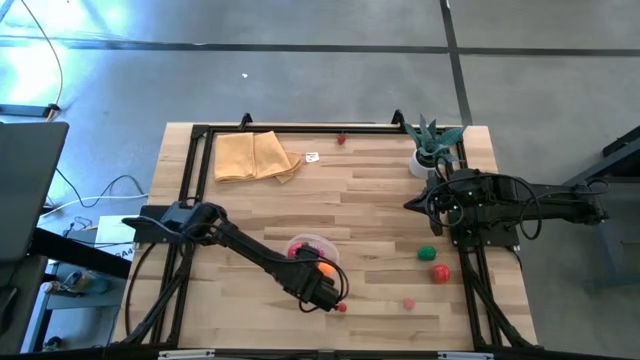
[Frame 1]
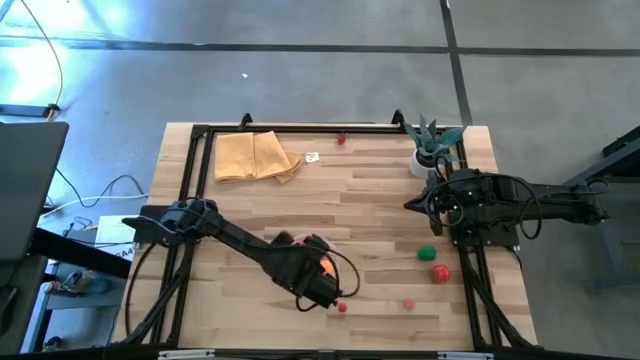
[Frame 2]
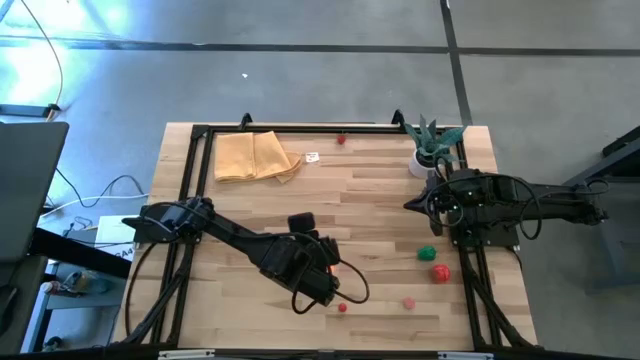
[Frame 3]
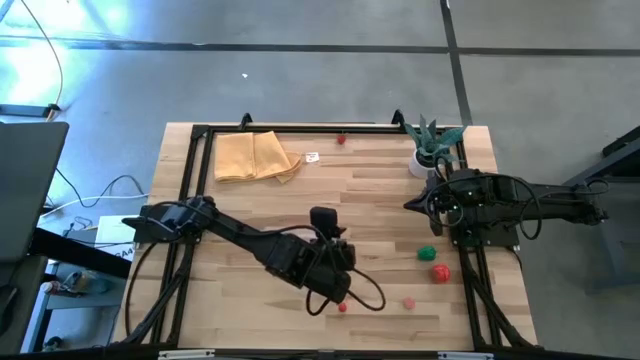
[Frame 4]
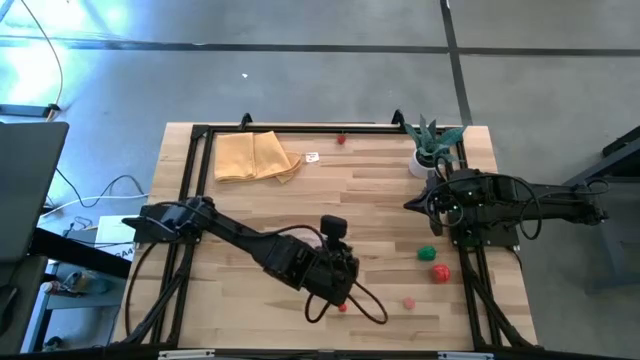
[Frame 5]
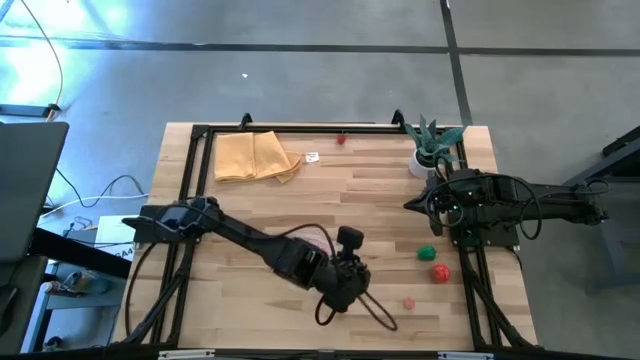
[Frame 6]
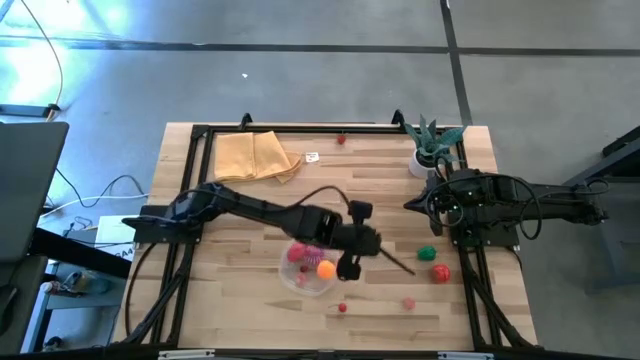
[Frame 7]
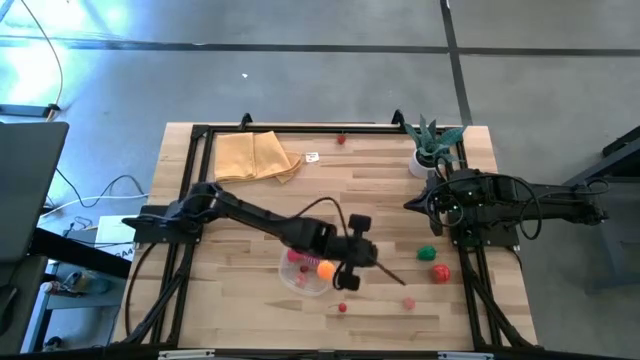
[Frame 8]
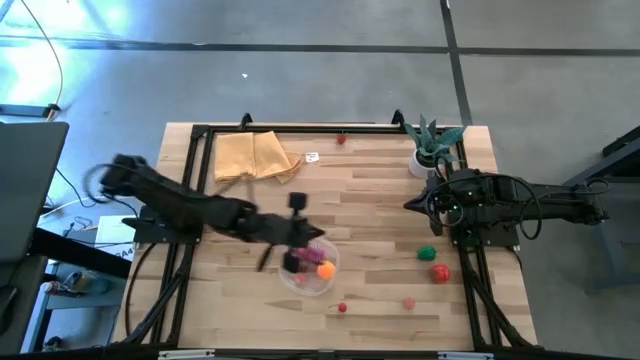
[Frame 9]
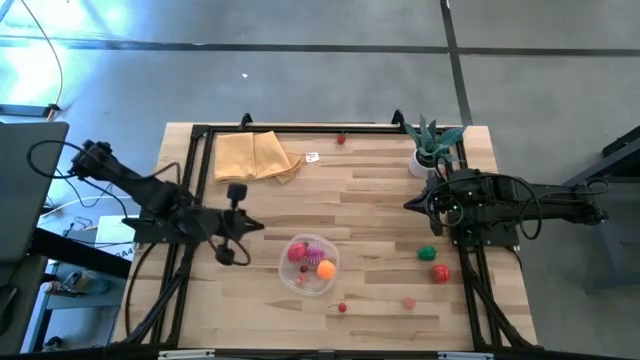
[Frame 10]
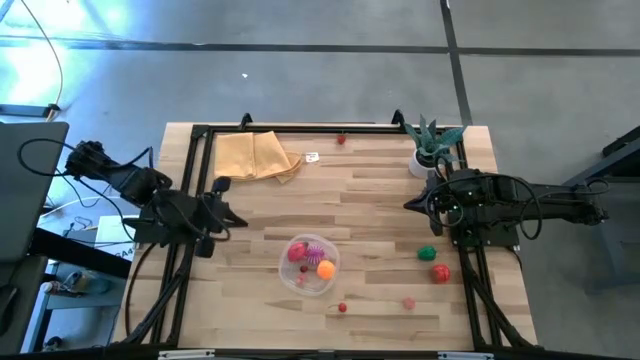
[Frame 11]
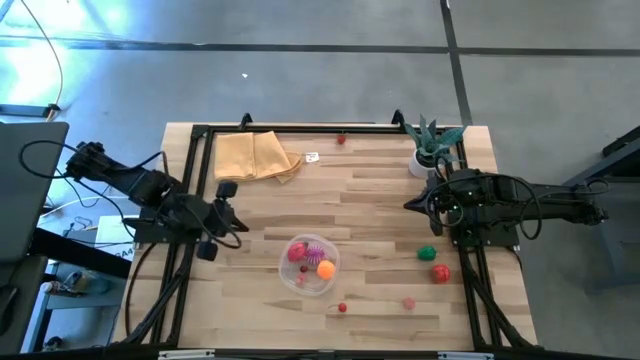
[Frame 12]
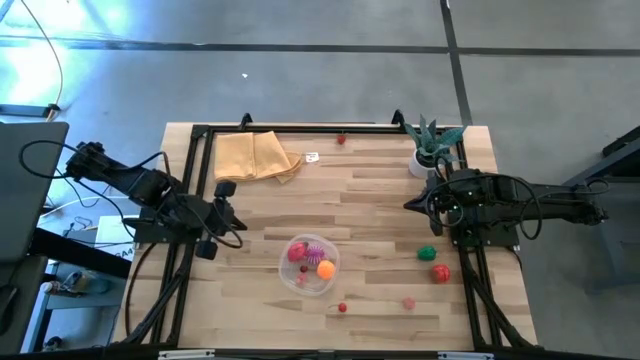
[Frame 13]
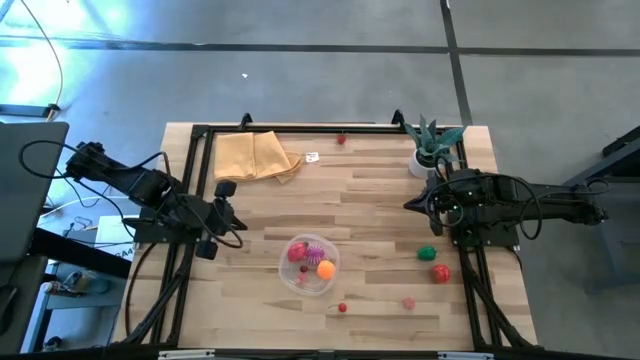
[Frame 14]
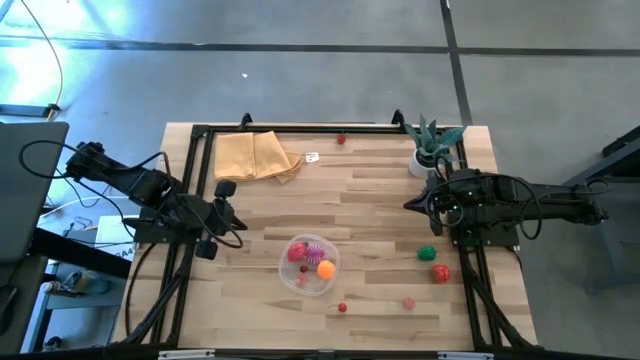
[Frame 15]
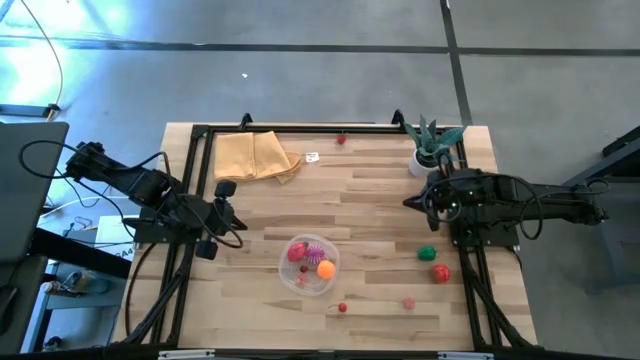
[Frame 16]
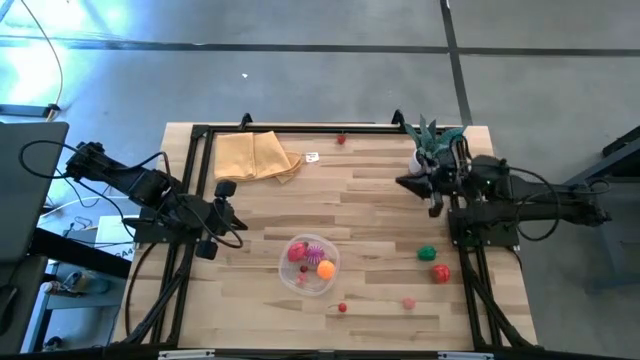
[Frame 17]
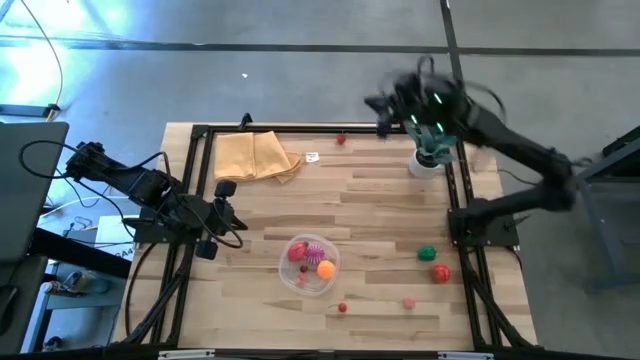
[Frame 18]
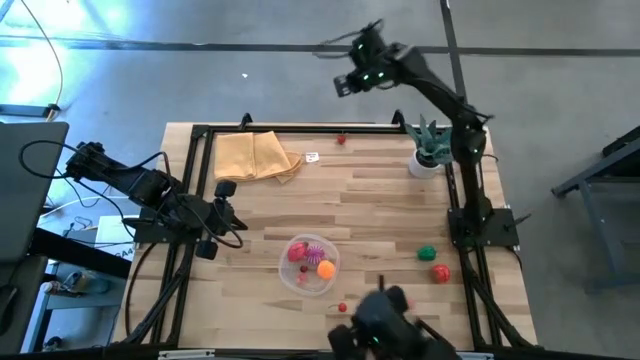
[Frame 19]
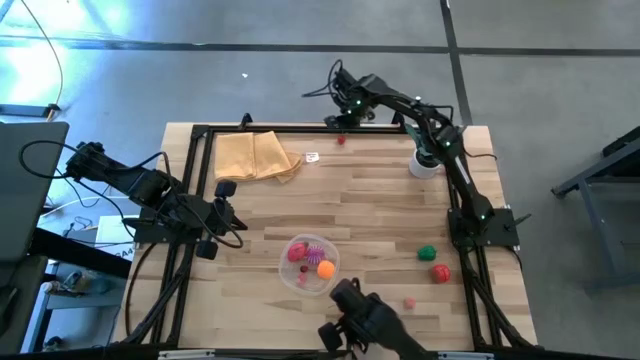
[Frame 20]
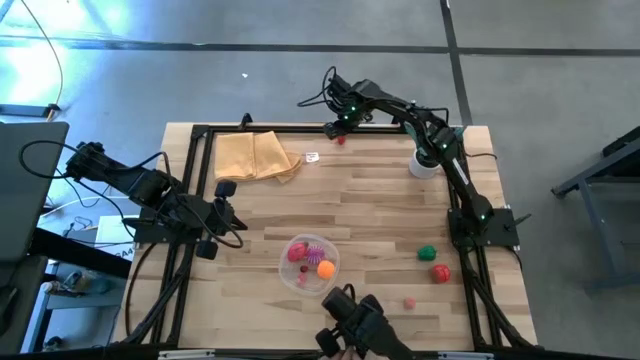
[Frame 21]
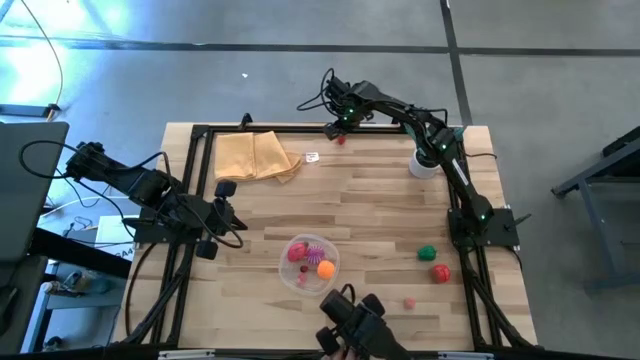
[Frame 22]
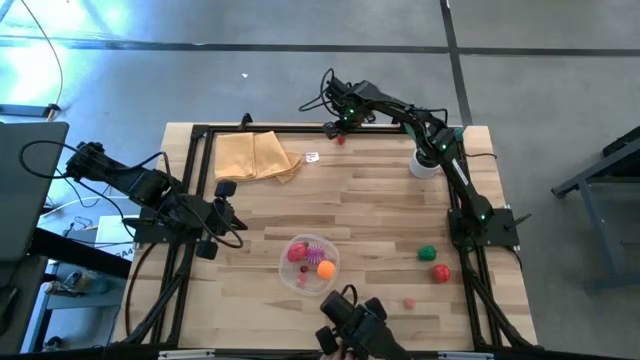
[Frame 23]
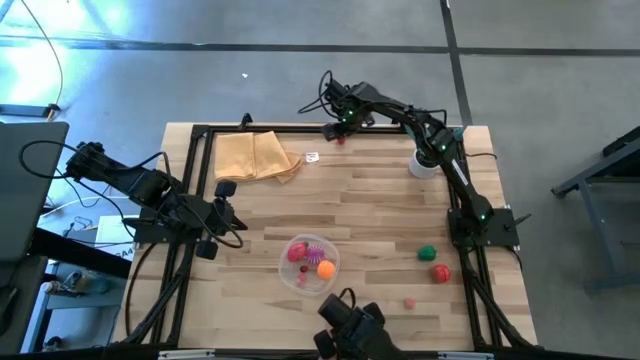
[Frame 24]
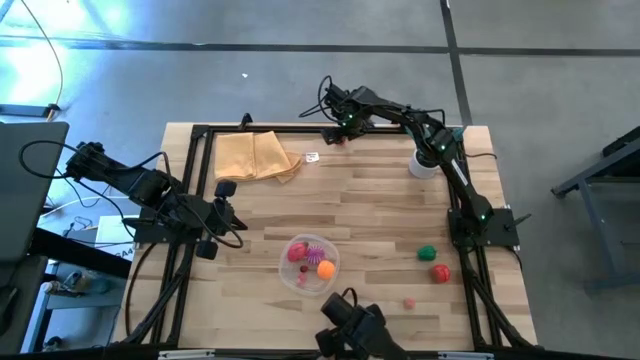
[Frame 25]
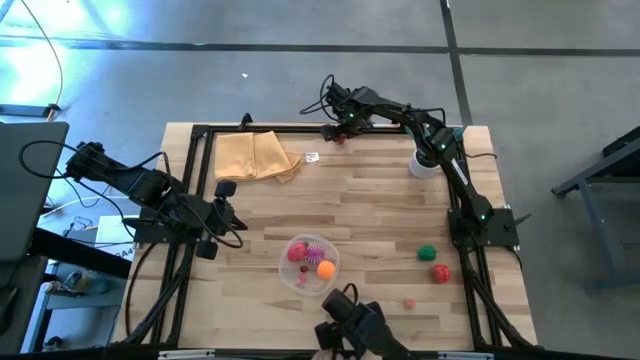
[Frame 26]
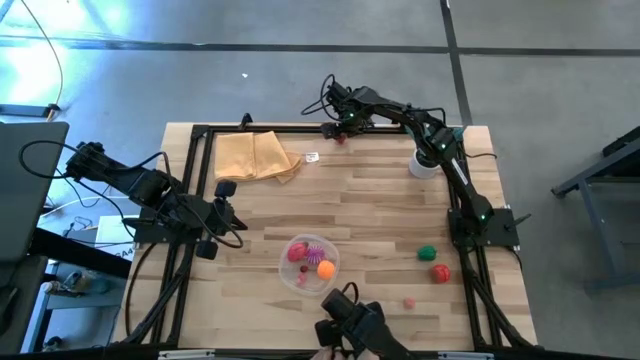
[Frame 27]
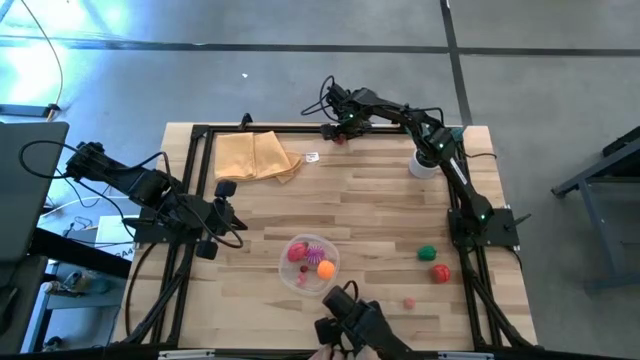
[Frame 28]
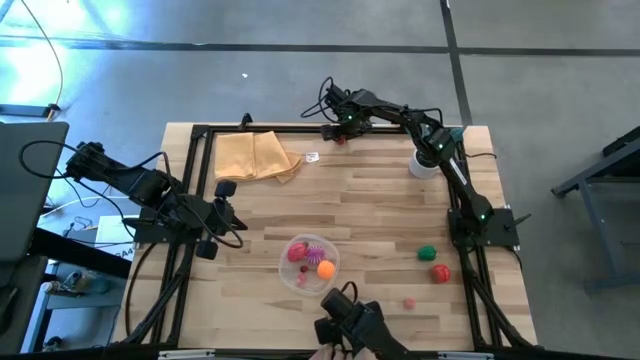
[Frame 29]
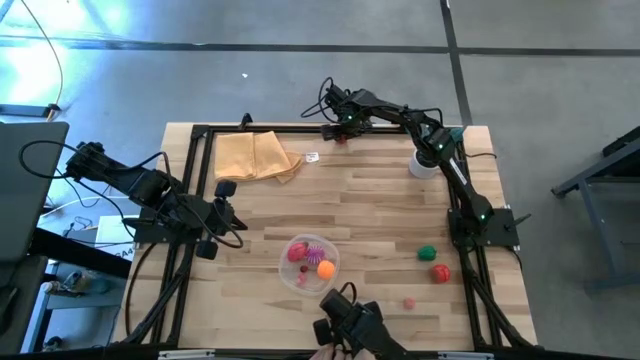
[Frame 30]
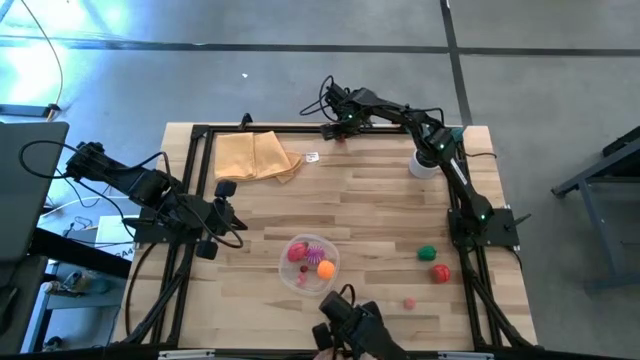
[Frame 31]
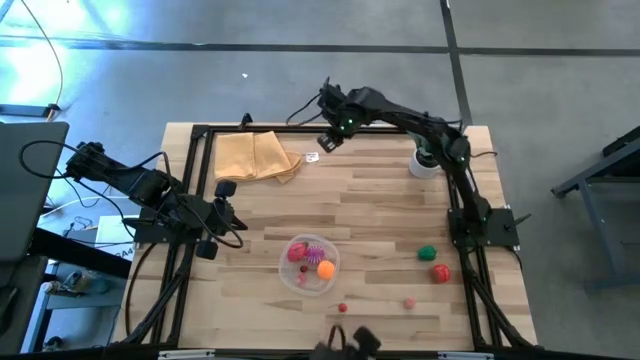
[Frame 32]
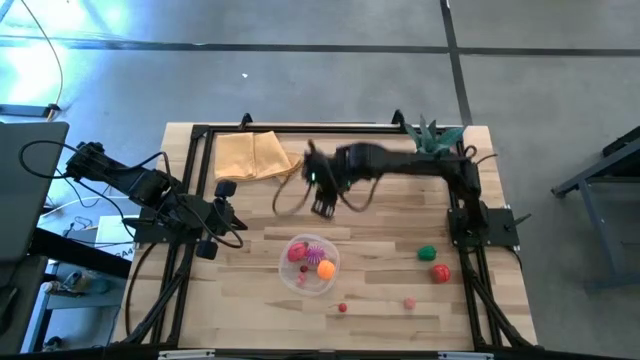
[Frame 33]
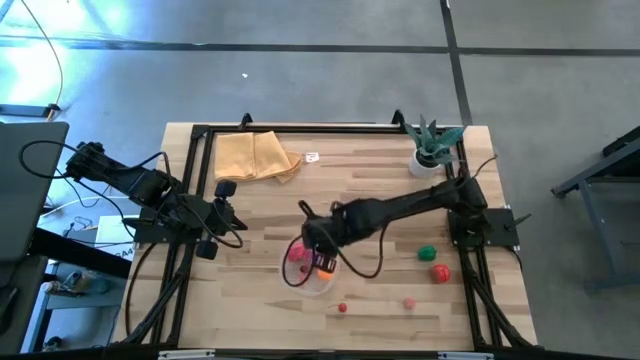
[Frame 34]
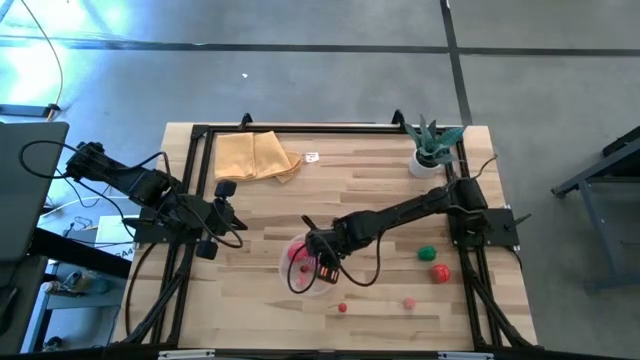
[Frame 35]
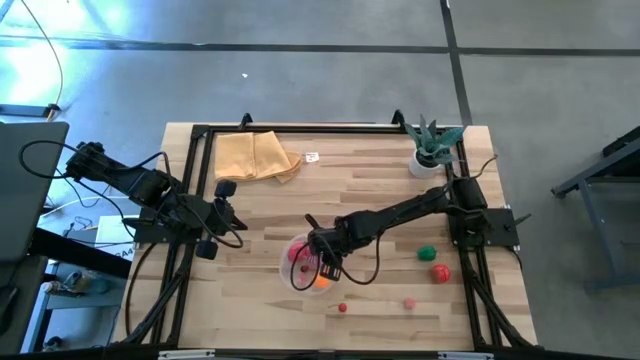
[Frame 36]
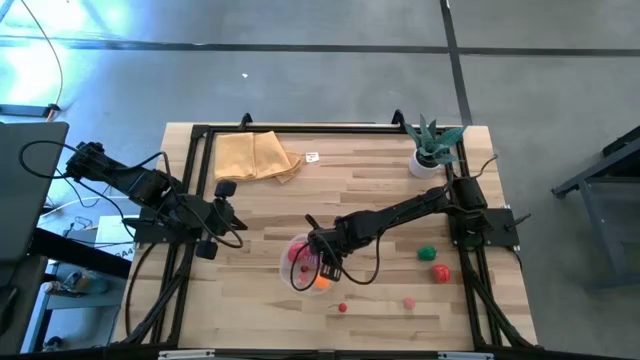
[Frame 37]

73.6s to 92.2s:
Task: Pick and placing Produce into tupperware
Put the strawberry into the bin

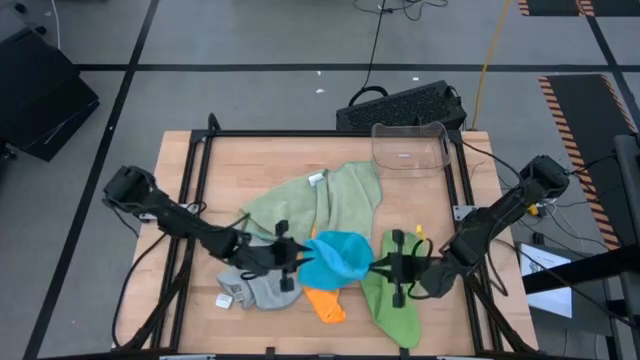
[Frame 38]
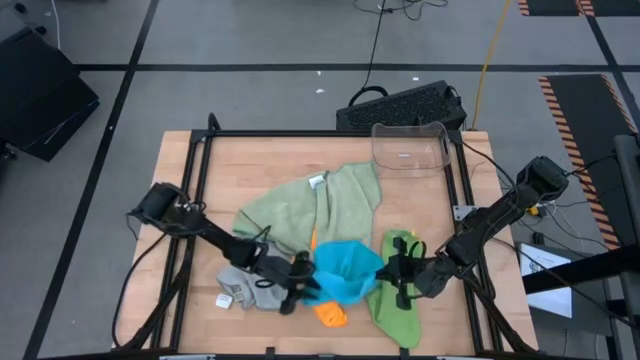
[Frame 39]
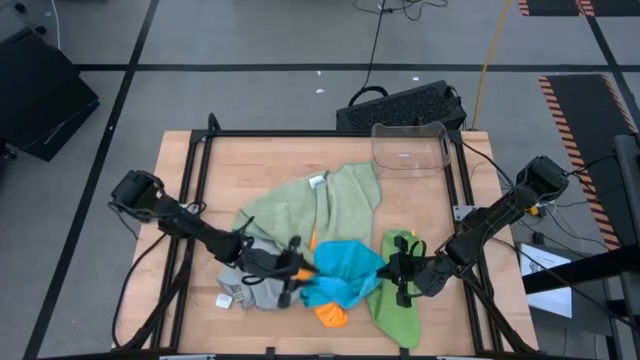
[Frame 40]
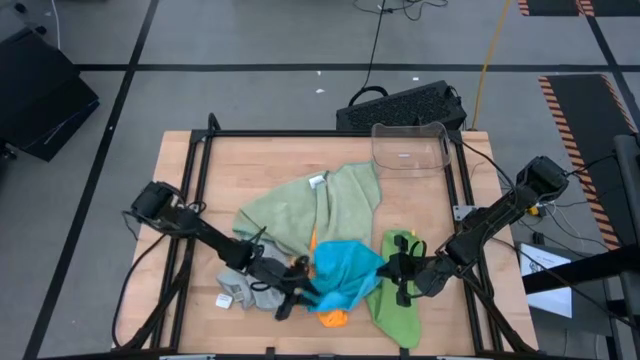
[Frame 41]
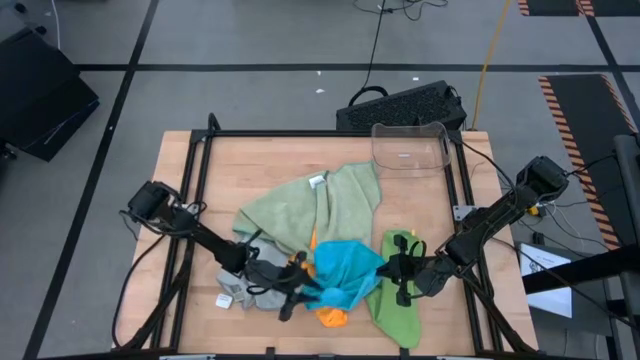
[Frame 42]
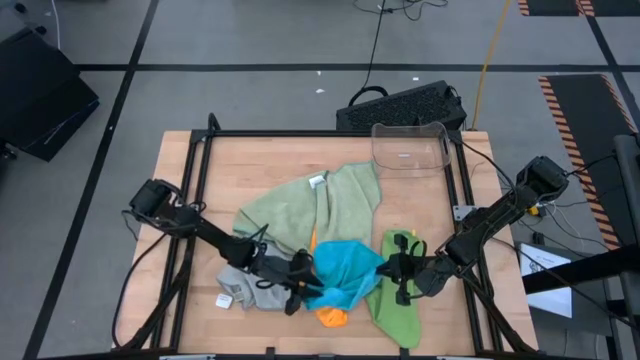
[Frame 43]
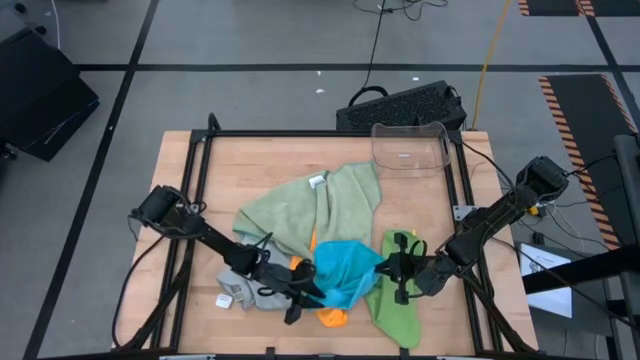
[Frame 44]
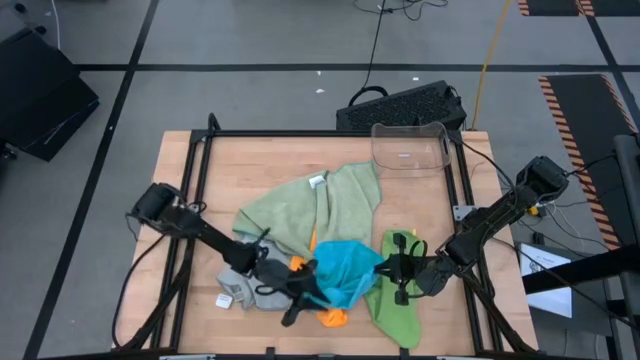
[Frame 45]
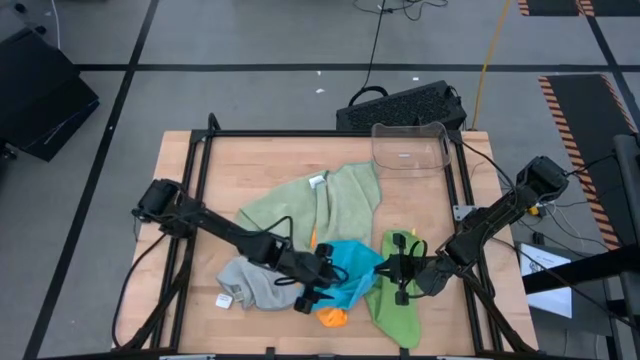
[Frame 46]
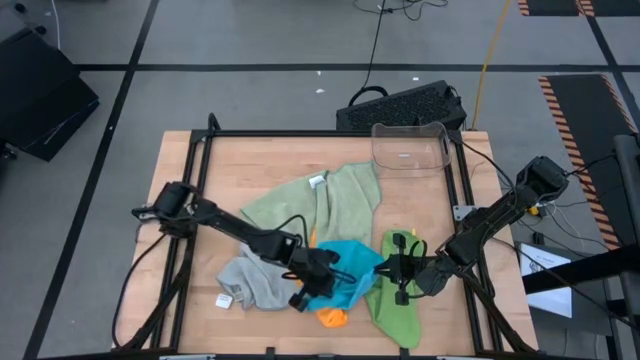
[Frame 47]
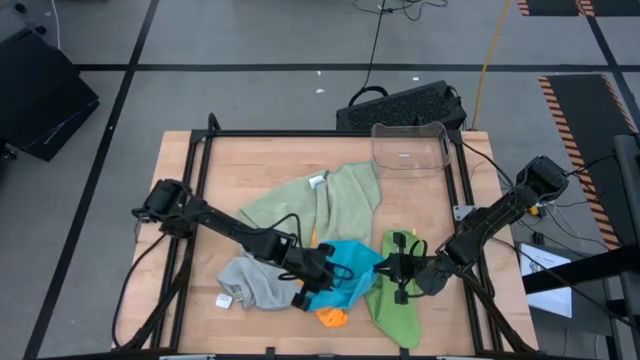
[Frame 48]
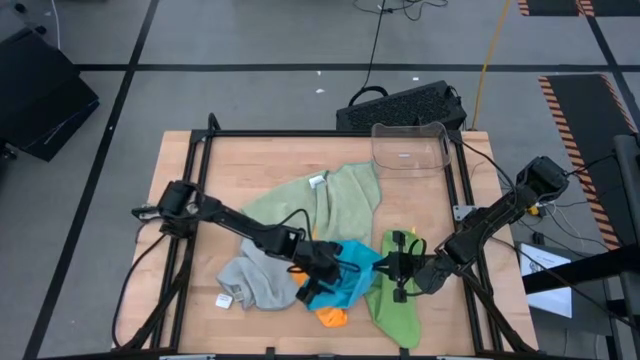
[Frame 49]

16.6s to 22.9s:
Task: Fold microfiber towels
Fold the blue microfiber towel
